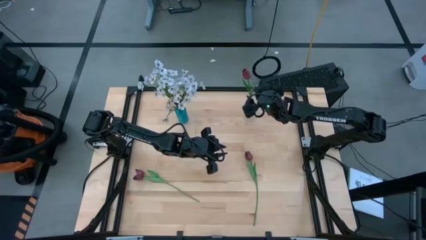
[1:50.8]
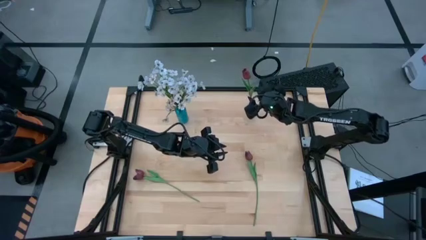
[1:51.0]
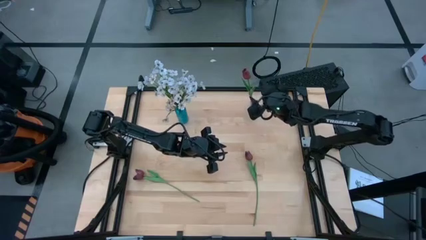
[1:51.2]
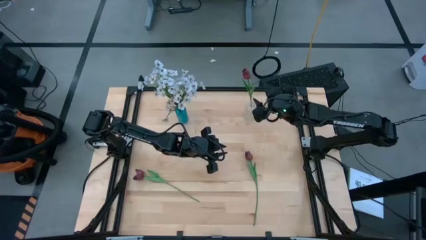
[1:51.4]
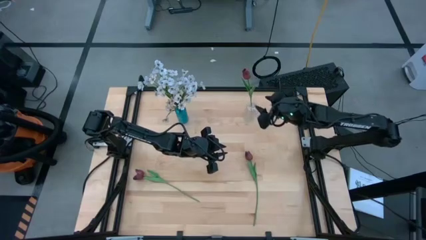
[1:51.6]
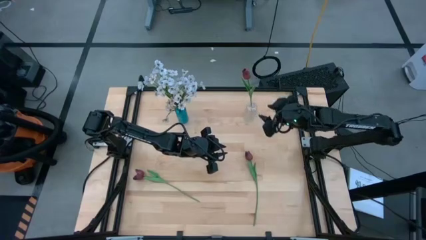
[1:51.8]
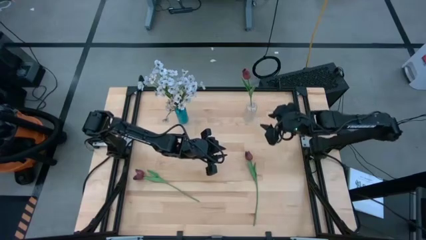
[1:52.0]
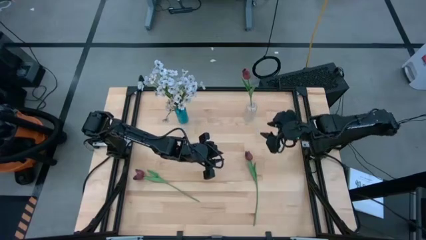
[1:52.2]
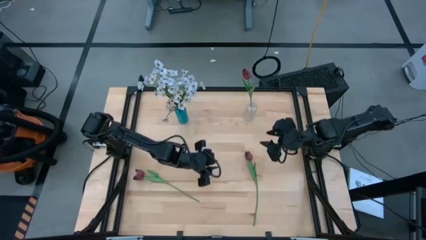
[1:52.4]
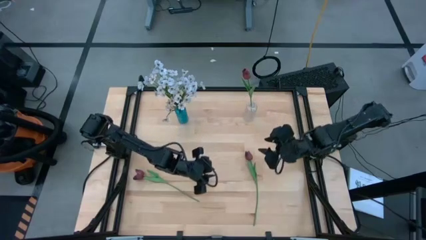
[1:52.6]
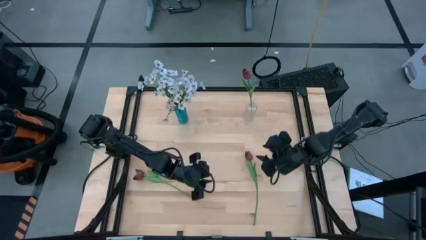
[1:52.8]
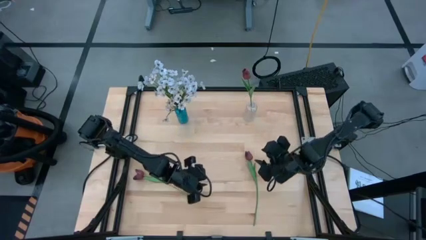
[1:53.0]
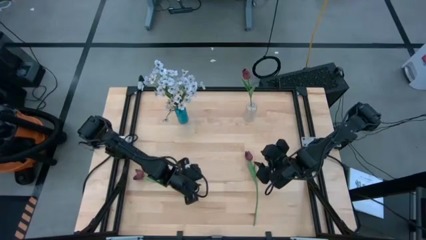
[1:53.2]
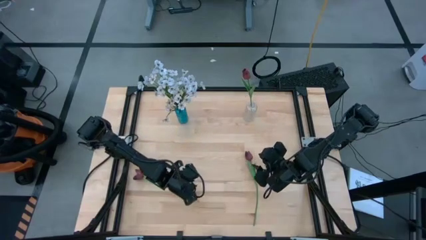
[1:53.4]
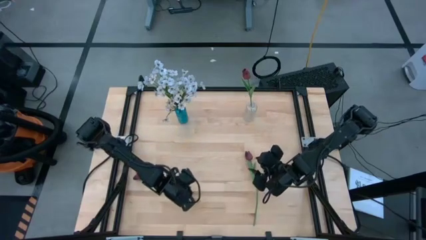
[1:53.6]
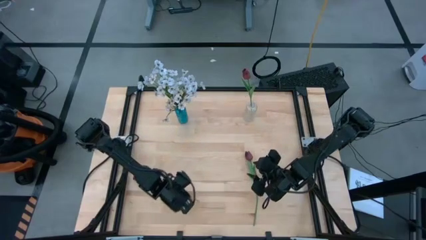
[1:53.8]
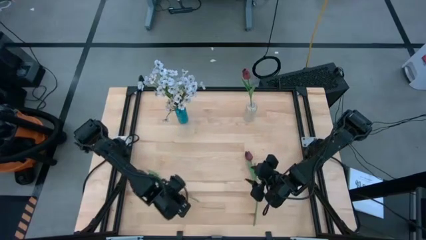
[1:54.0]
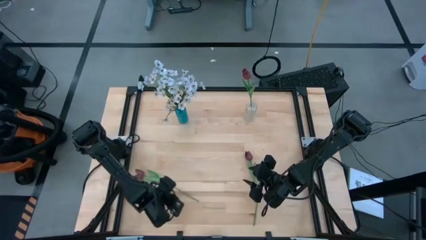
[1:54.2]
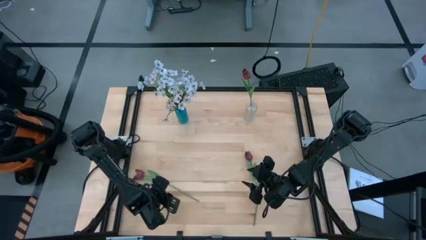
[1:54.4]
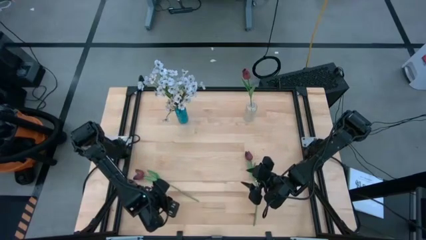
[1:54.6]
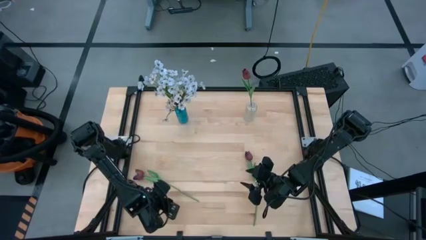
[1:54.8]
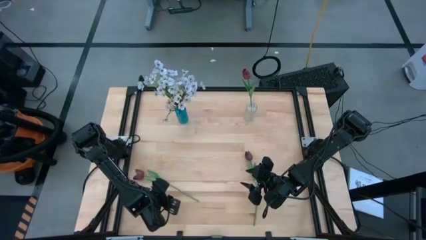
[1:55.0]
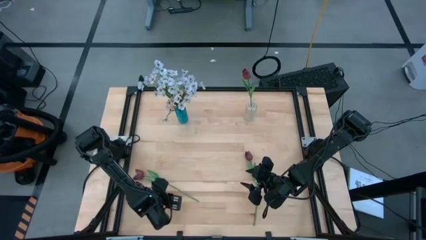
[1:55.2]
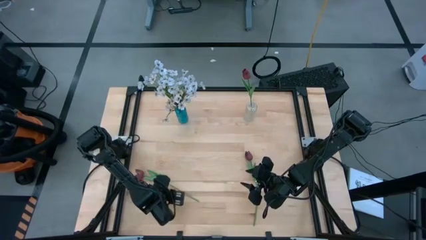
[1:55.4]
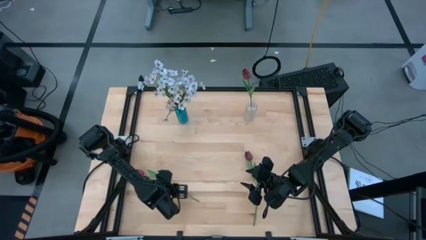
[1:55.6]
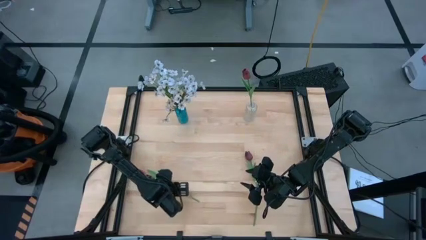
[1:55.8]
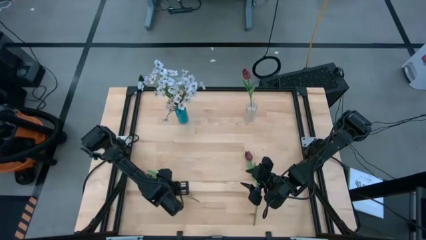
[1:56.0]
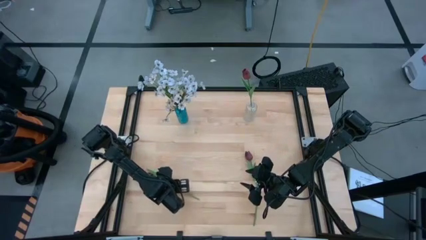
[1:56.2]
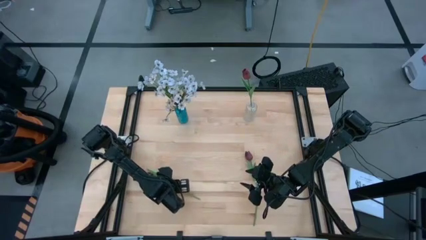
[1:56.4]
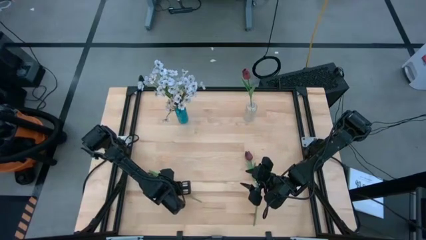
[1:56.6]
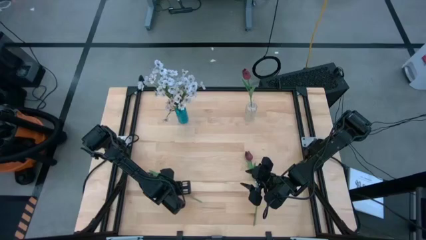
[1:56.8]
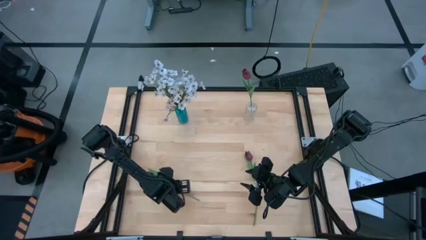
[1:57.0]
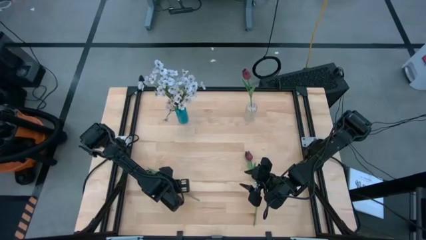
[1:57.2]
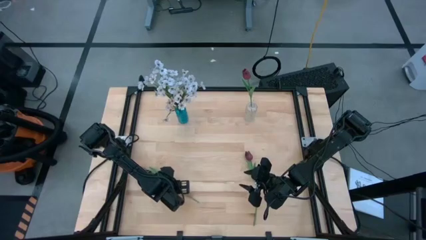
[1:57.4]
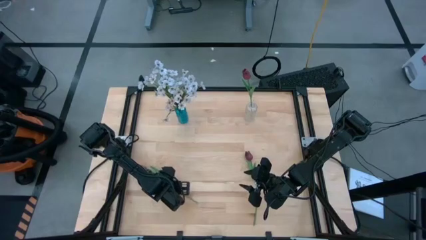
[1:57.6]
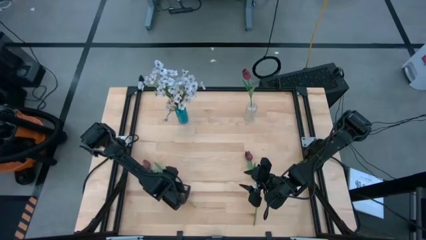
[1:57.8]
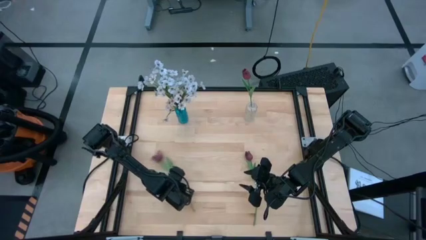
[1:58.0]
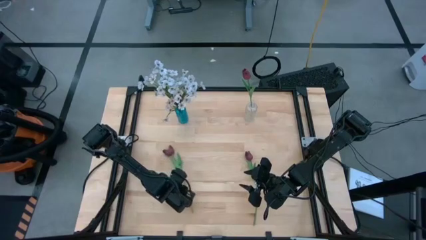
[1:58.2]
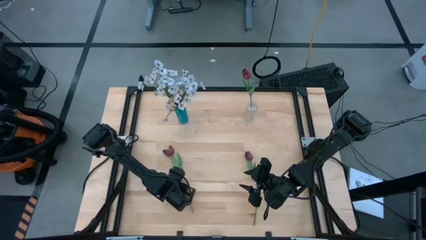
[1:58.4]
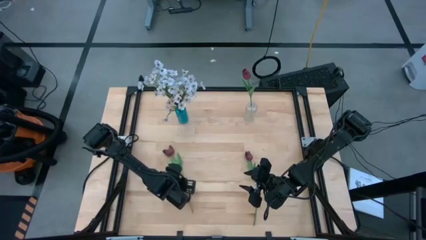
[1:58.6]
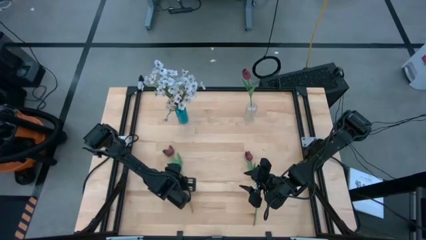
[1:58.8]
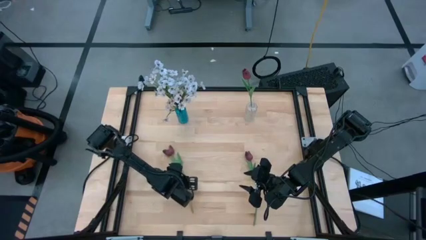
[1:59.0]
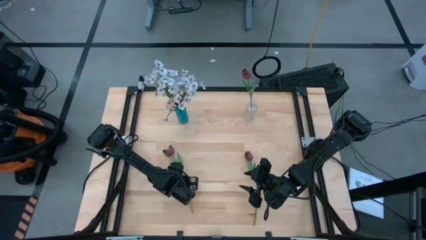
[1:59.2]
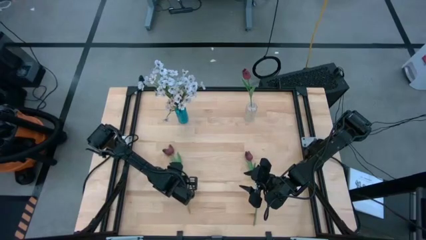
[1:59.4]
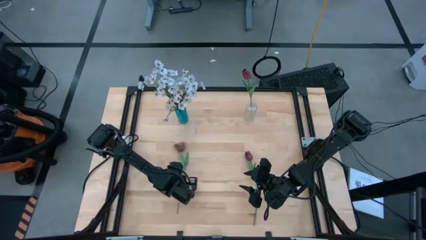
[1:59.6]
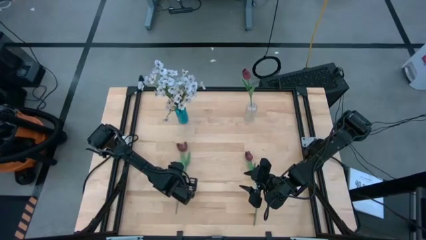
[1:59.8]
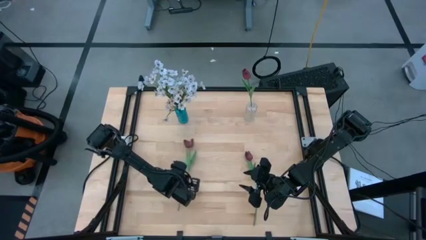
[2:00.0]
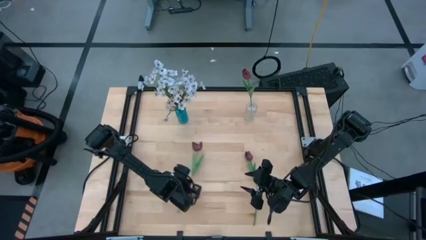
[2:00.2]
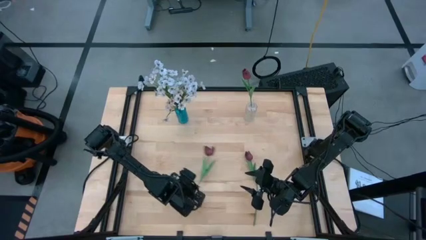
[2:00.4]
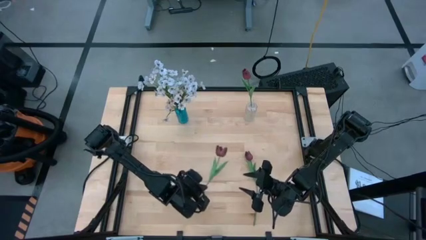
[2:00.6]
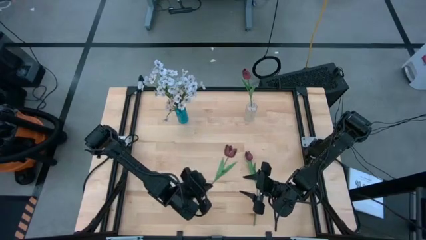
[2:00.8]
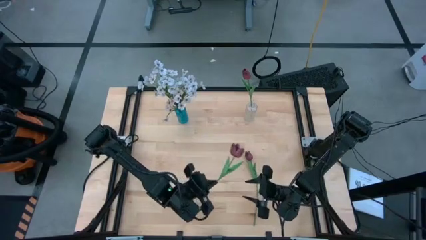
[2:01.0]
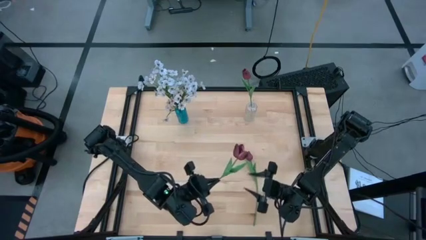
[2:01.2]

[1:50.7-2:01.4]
Task: Sort flowers into vase by color
Put the left red tulip into the transparent vase

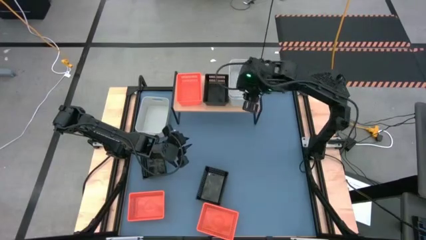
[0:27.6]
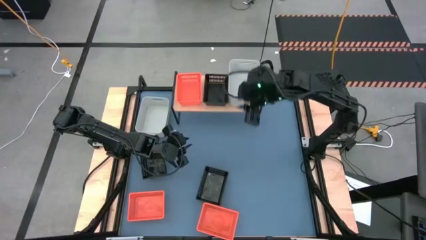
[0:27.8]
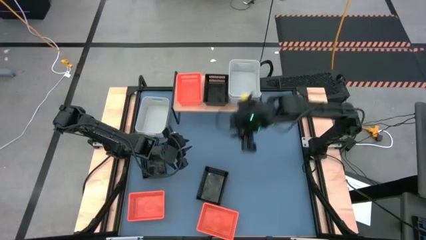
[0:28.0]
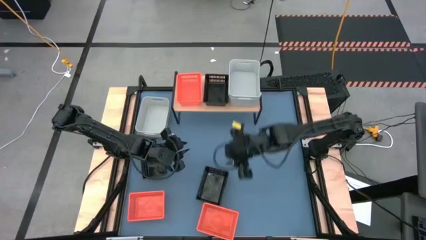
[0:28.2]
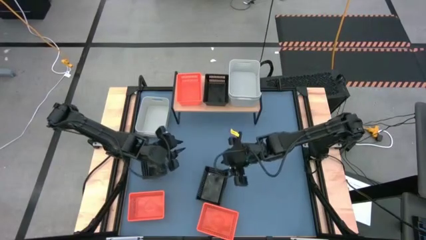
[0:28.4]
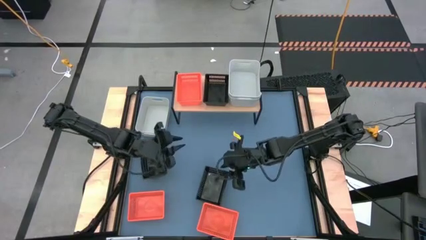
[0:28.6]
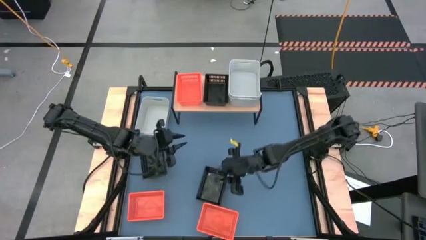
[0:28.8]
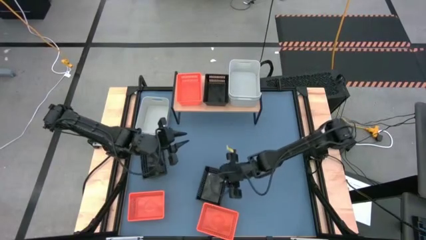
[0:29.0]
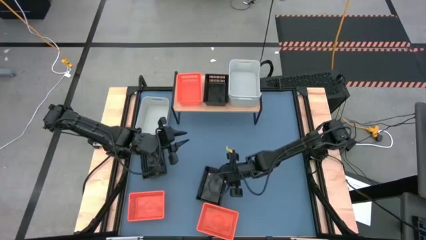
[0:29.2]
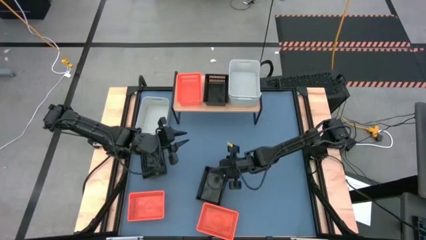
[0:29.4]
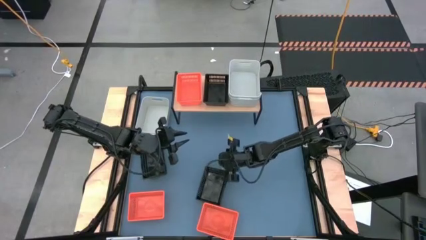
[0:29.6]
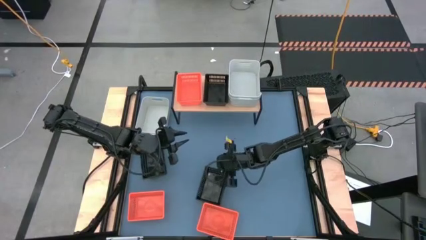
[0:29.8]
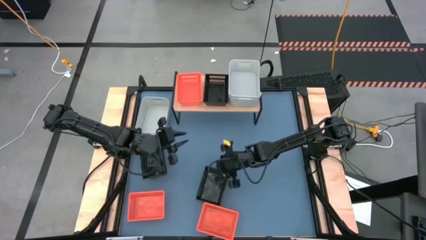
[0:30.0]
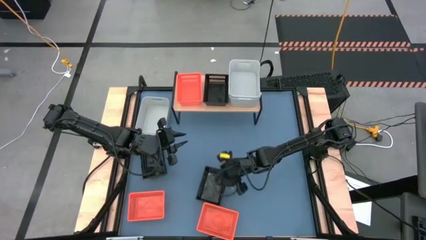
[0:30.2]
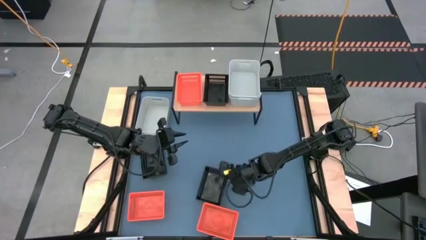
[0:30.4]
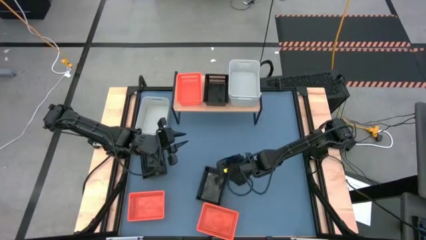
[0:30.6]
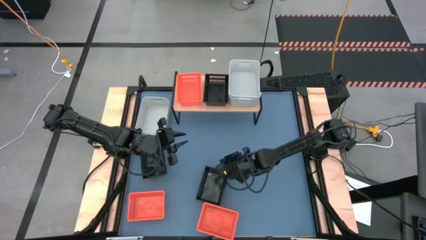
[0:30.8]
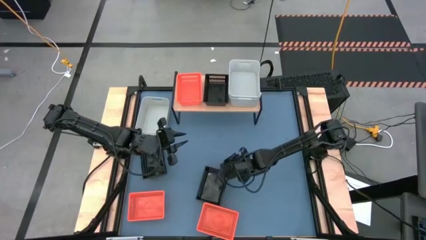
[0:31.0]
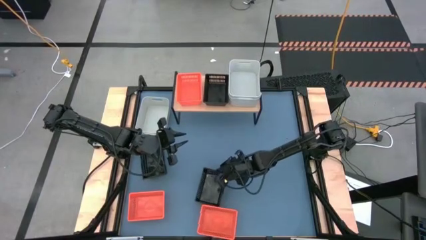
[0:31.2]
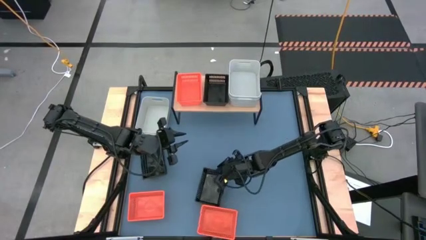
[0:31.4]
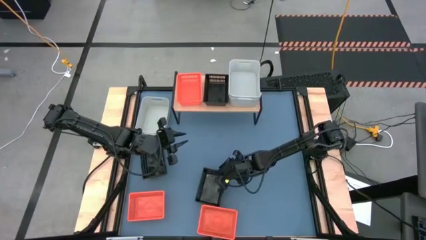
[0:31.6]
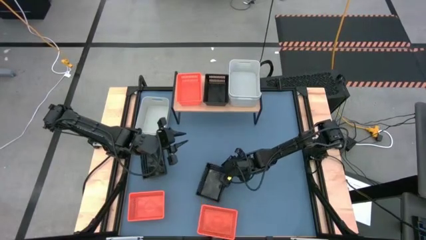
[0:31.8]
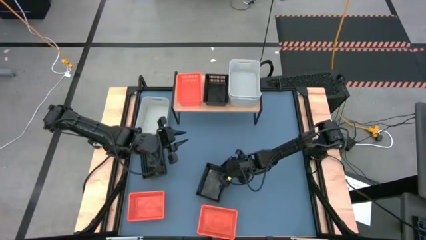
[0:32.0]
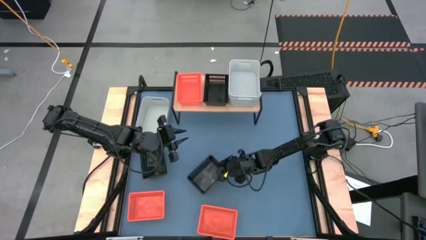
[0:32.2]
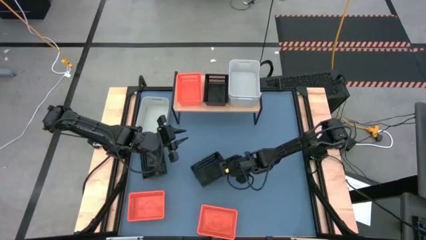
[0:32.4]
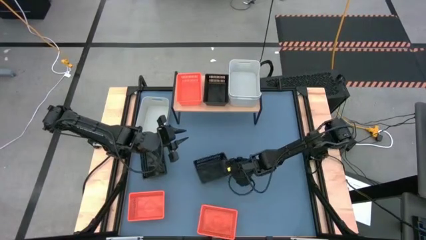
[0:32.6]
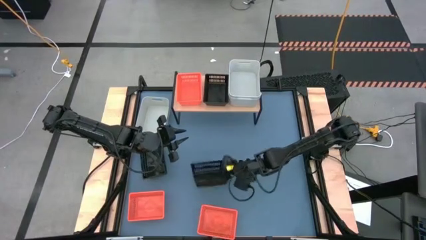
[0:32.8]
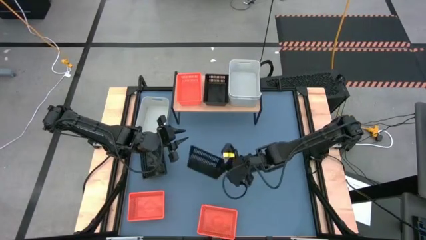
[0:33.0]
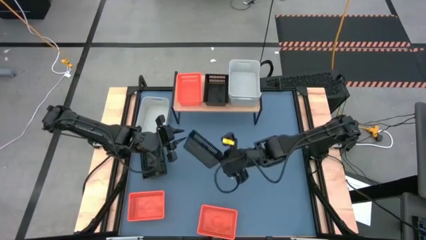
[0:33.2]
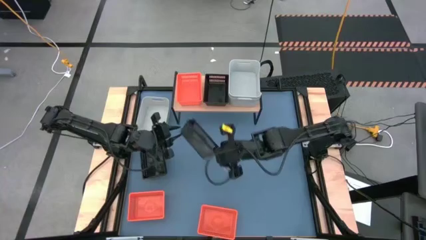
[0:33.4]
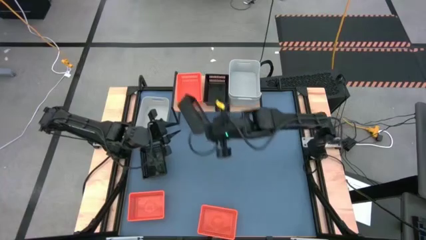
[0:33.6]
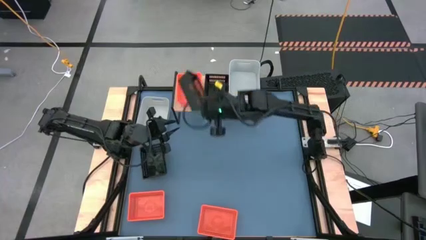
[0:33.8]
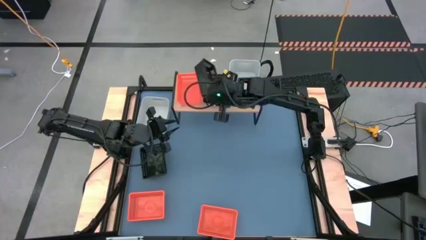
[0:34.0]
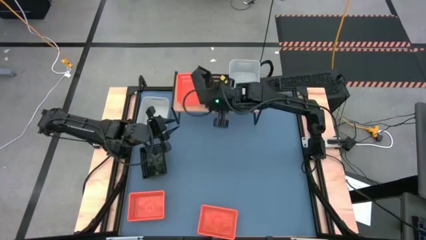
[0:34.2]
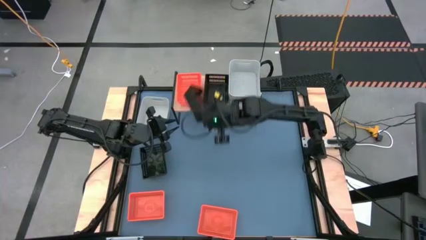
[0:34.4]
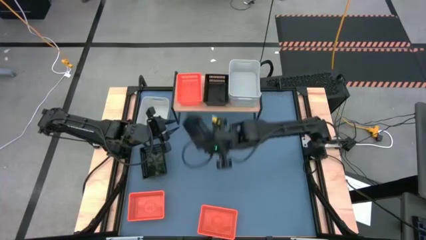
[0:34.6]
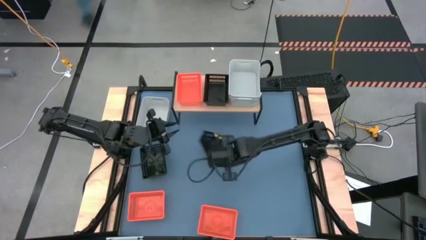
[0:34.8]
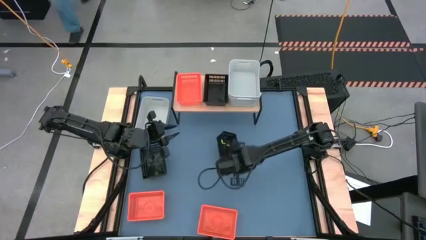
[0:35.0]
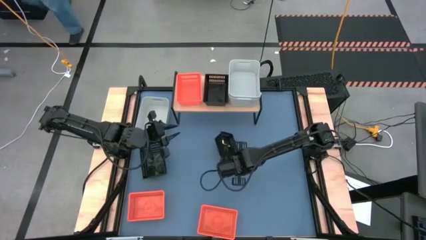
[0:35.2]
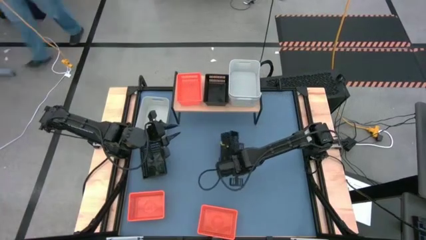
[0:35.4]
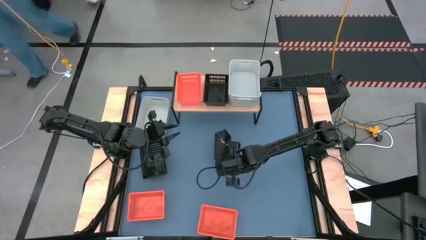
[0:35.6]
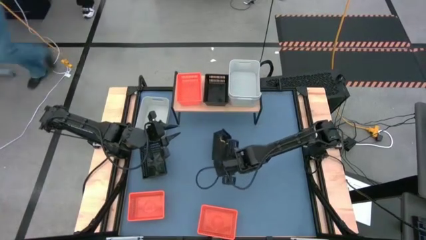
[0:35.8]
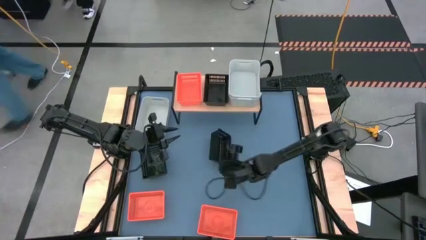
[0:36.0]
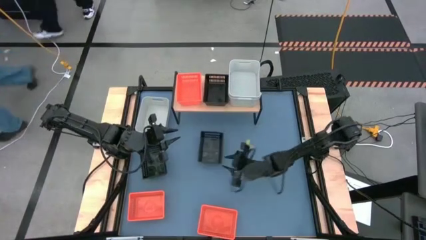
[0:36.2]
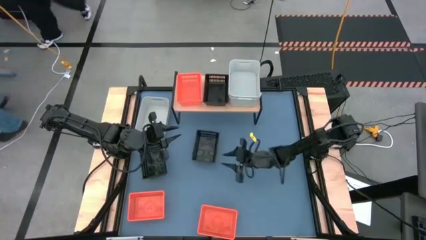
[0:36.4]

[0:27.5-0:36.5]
Task: Stack baskets on shelf by color
Stack the right black bin on top of the other black bin on the shelf
